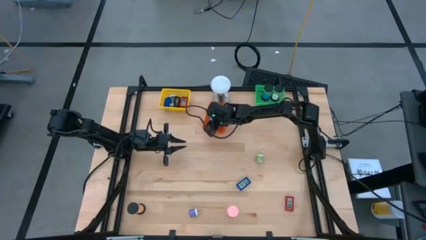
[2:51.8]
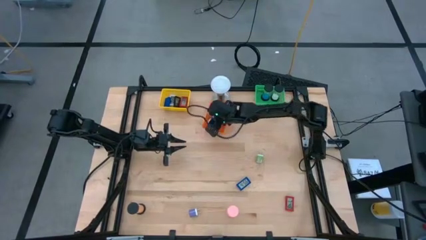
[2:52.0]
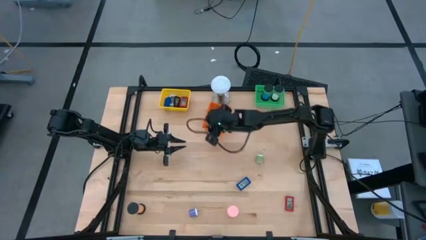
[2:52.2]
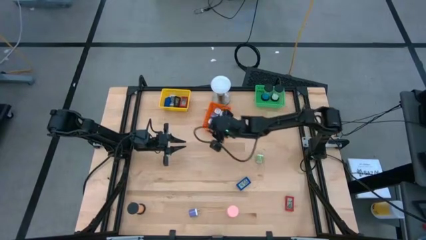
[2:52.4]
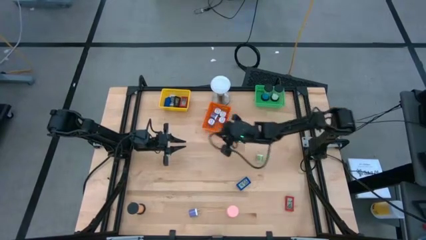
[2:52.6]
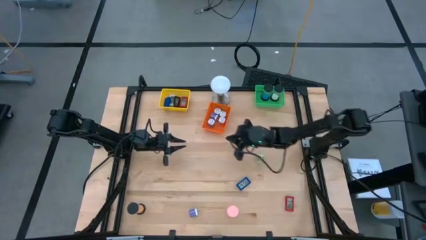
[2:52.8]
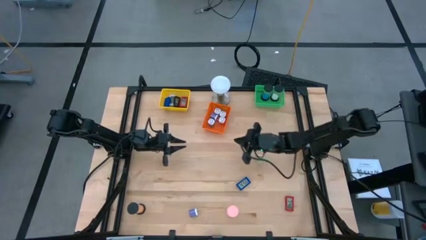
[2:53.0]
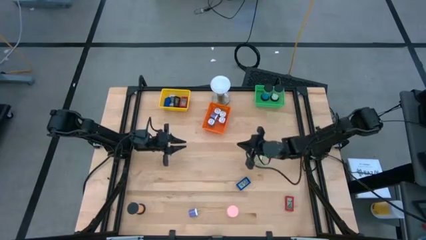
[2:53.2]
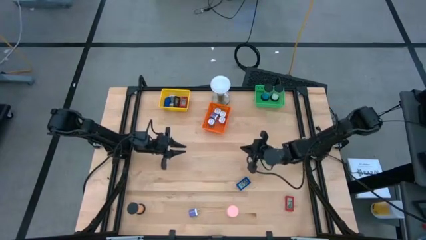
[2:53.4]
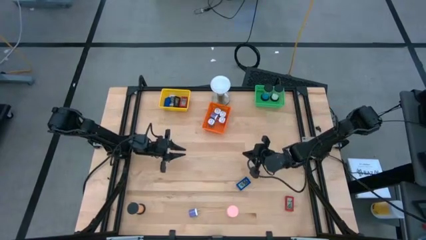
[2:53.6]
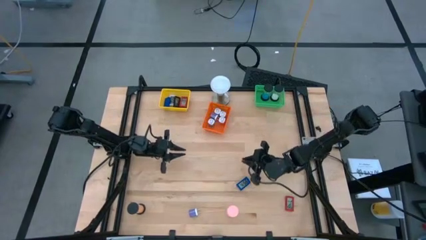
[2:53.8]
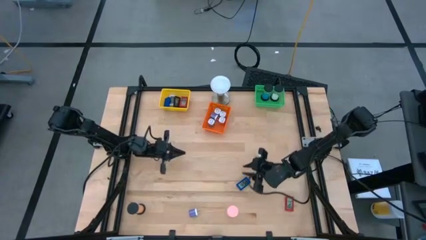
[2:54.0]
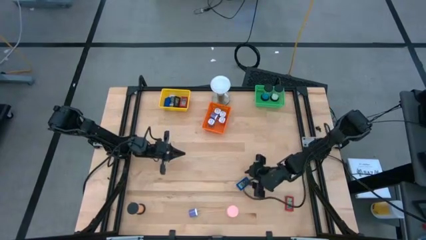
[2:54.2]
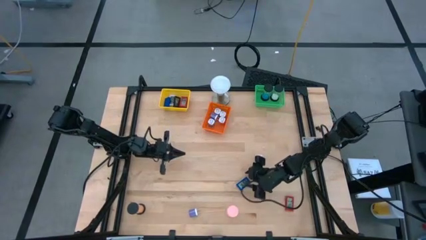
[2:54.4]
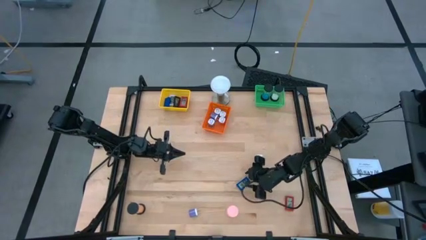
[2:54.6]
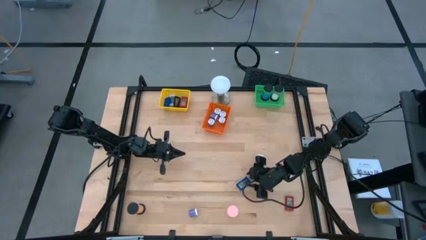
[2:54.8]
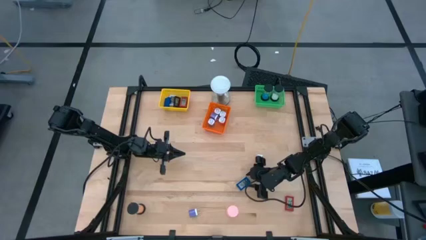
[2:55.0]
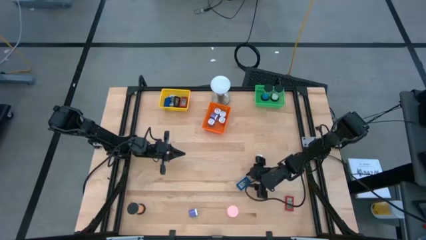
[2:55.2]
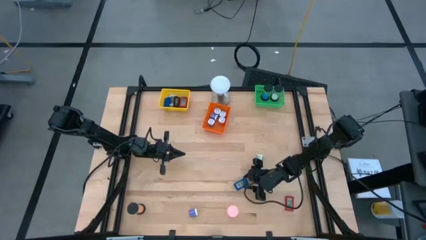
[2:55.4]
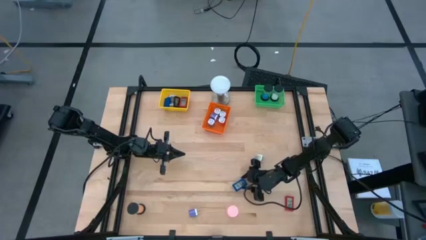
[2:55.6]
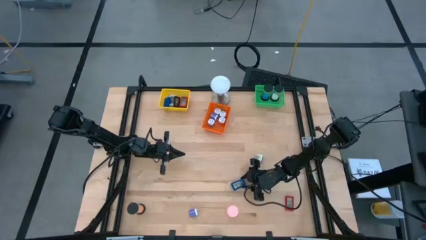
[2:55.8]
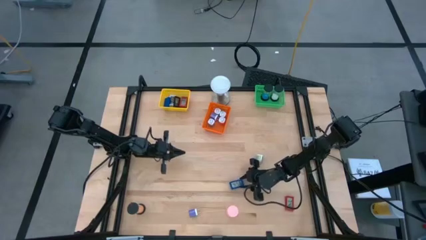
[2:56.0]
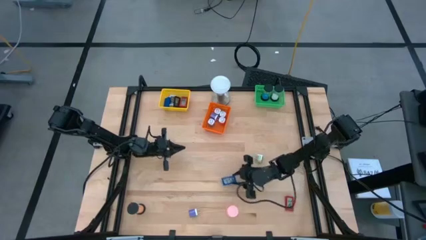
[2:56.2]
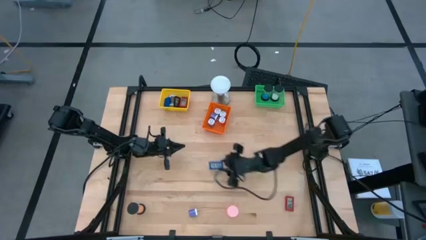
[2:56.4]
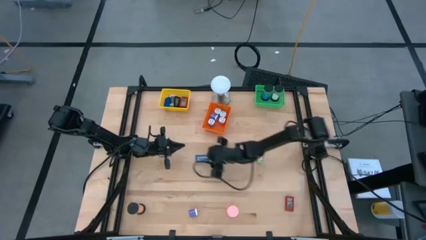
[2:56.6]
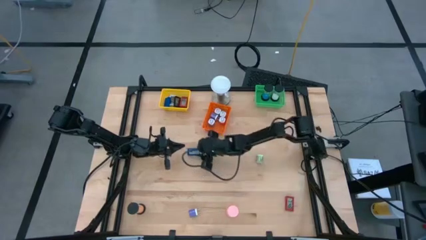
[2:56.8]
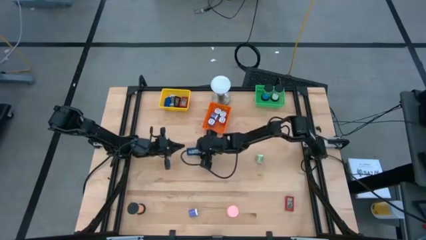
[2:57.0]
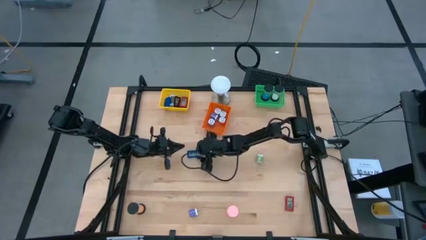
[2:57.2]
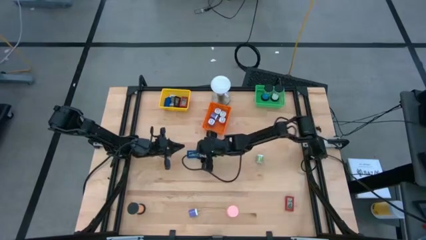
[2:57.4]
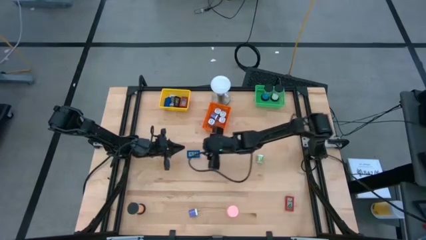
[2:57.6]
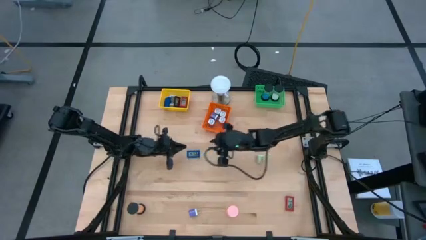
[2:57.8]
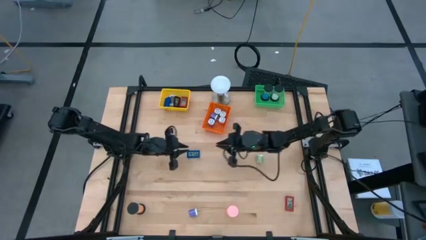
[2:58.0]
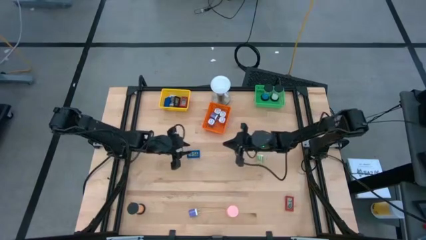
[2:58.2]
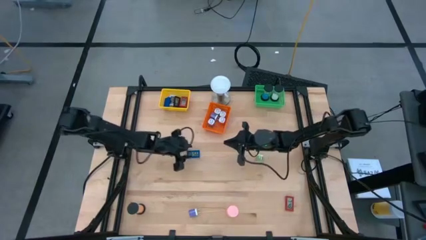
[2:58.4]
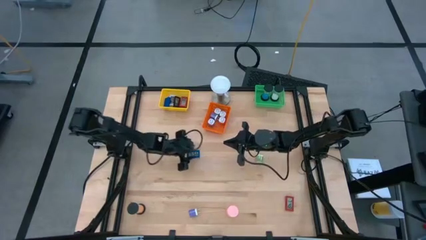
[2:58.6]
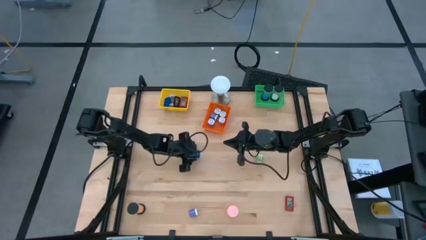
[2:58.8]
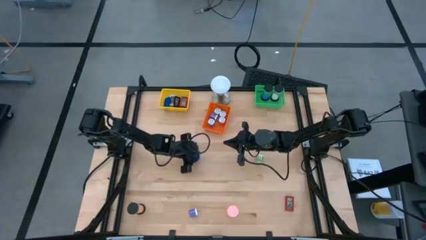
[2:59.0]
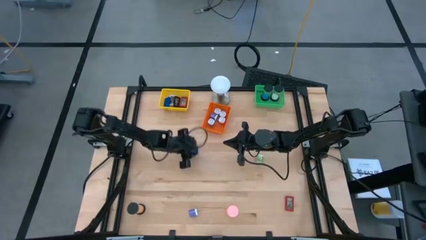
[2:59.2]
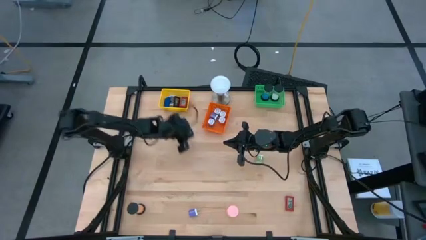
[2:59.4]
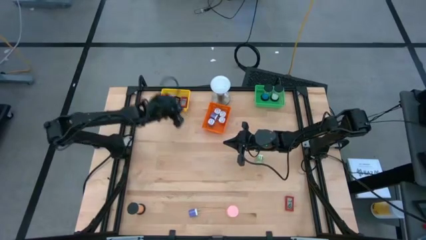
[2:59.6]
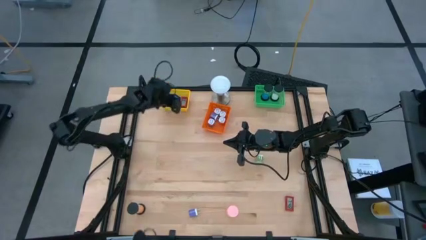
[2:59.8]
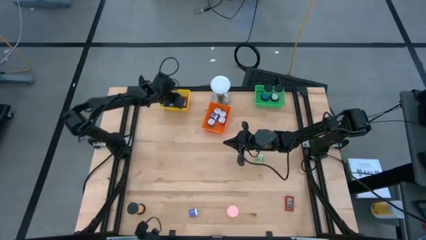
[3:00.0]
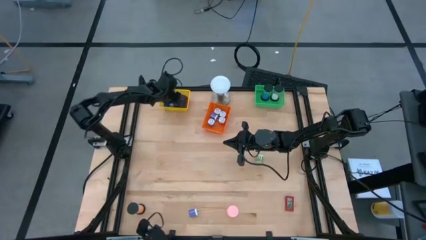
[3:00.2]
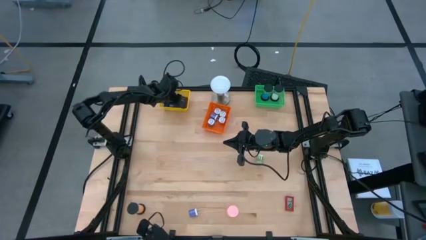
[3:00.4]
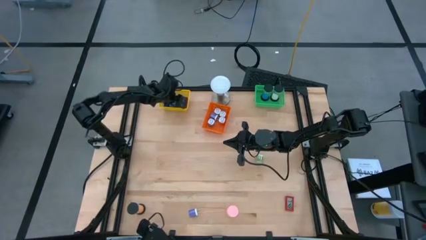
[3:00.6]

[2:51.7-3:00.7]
Task: Pick & Place Office items
Put the blue digital clock into the yellow bin

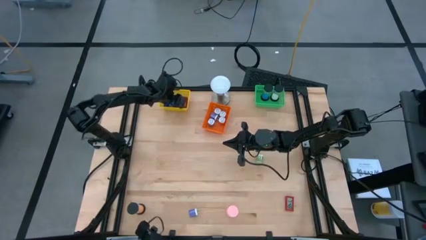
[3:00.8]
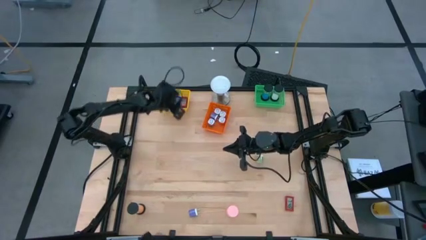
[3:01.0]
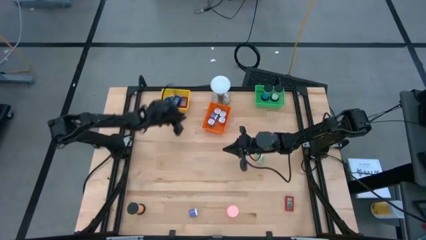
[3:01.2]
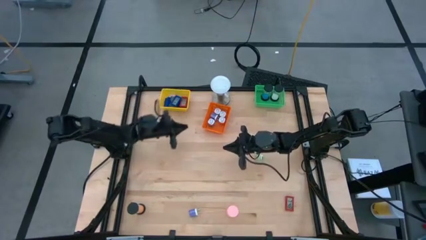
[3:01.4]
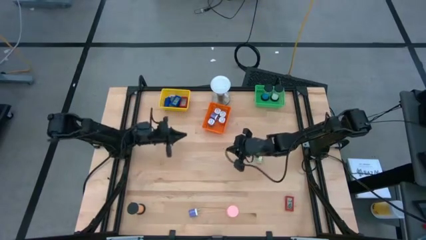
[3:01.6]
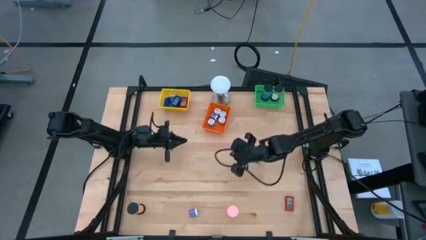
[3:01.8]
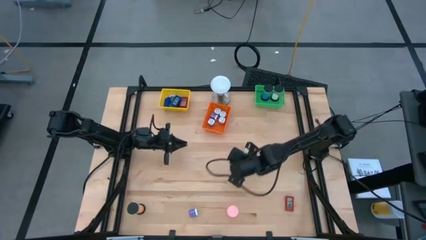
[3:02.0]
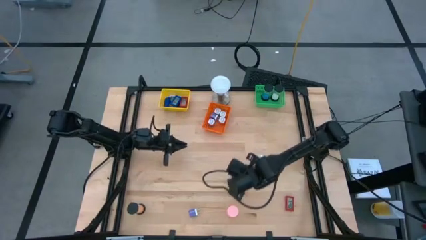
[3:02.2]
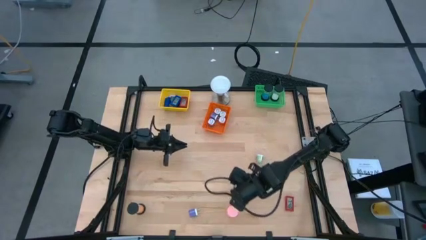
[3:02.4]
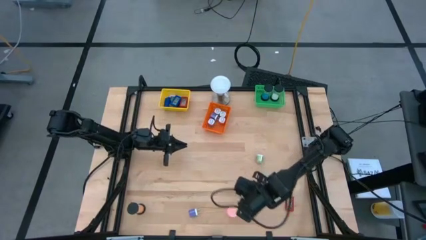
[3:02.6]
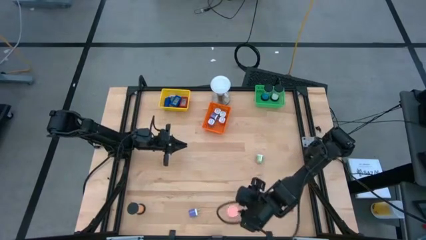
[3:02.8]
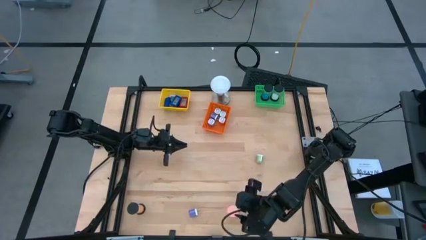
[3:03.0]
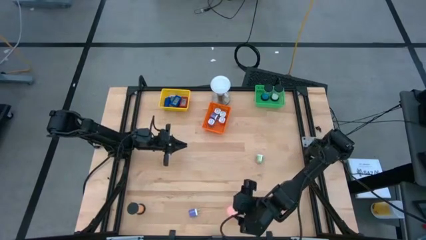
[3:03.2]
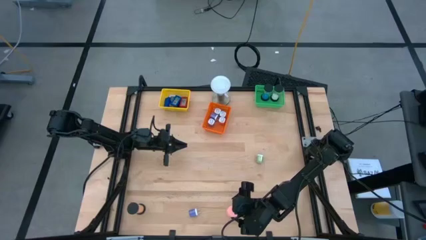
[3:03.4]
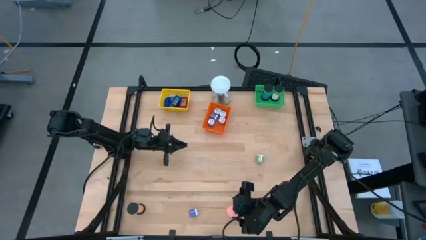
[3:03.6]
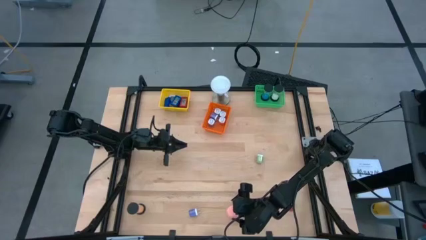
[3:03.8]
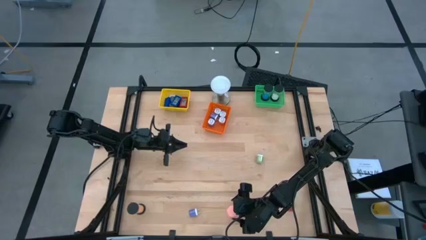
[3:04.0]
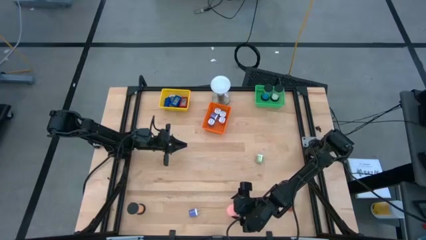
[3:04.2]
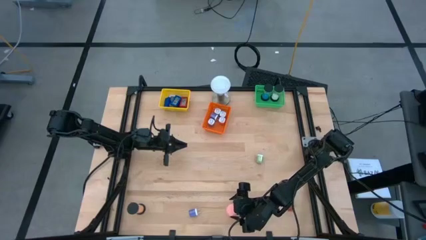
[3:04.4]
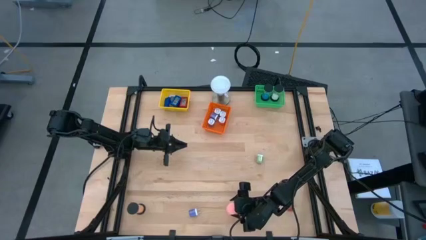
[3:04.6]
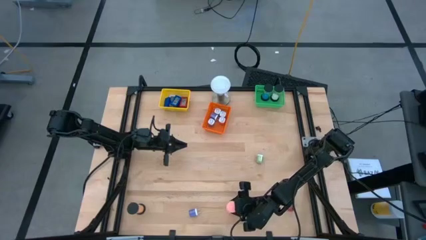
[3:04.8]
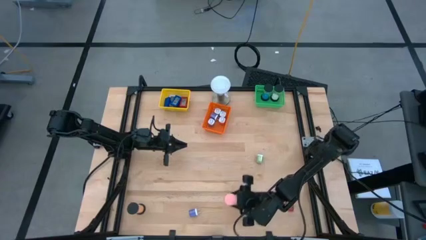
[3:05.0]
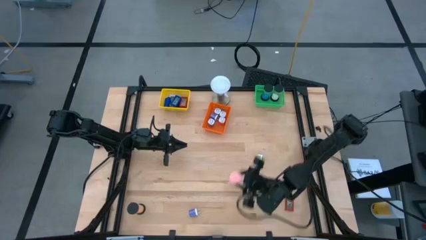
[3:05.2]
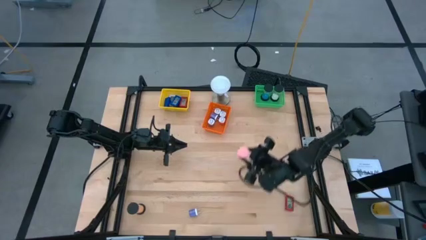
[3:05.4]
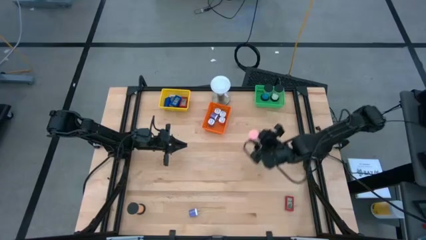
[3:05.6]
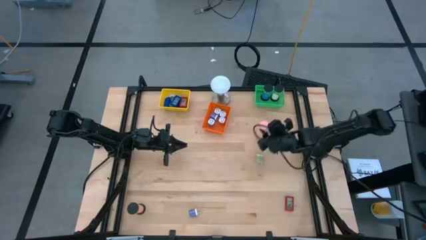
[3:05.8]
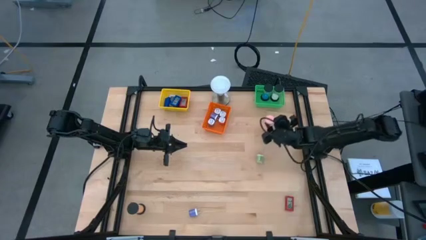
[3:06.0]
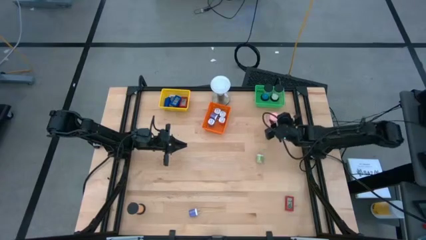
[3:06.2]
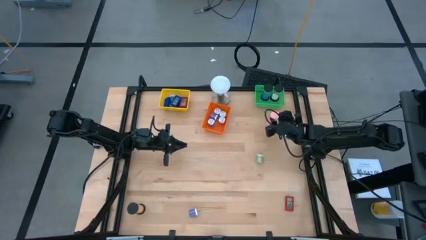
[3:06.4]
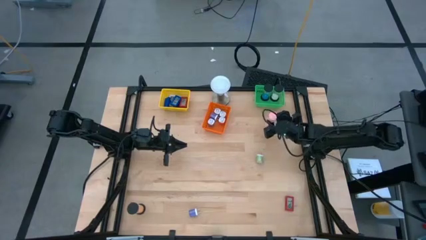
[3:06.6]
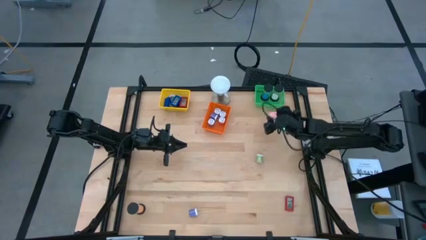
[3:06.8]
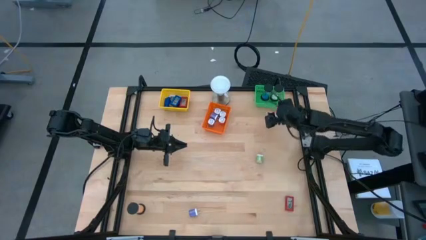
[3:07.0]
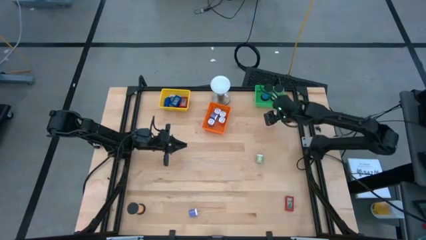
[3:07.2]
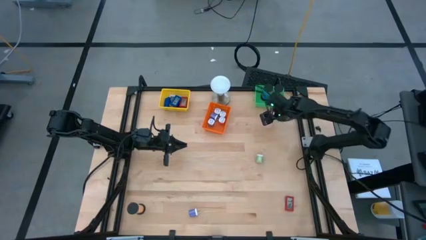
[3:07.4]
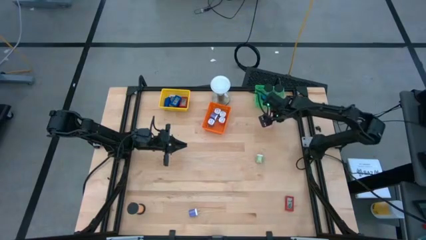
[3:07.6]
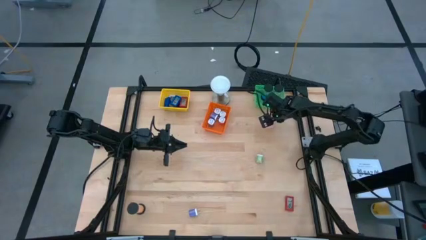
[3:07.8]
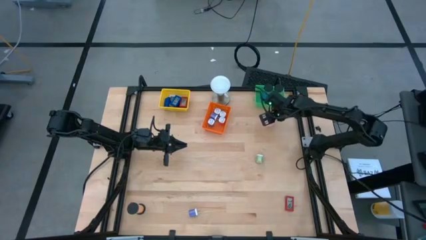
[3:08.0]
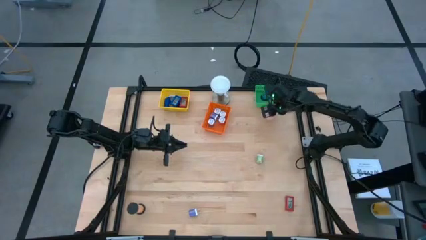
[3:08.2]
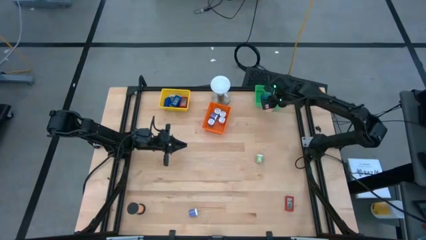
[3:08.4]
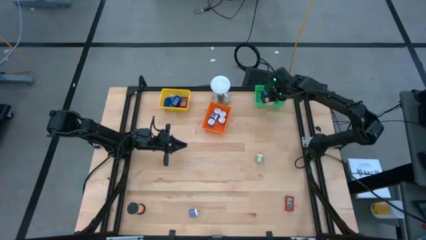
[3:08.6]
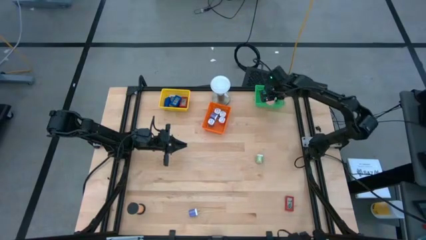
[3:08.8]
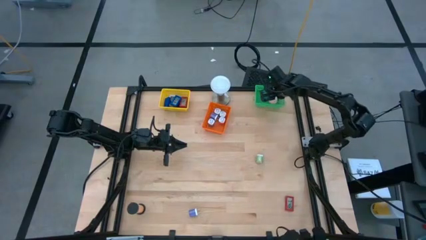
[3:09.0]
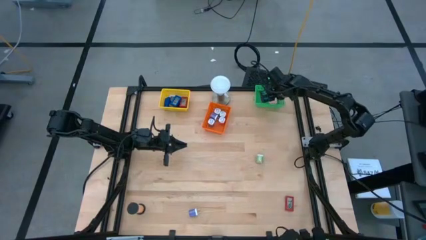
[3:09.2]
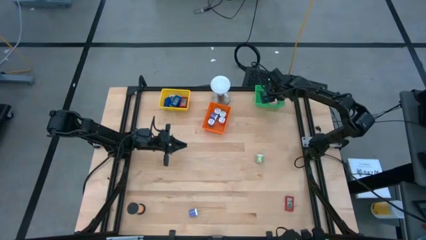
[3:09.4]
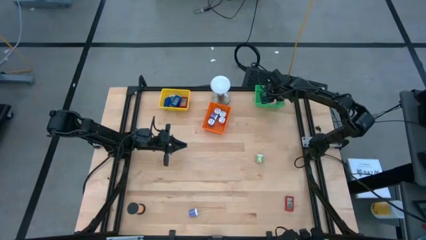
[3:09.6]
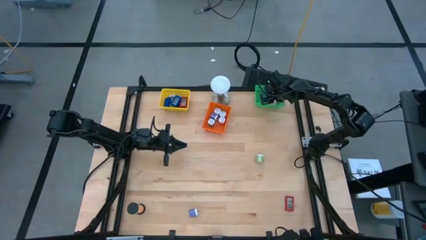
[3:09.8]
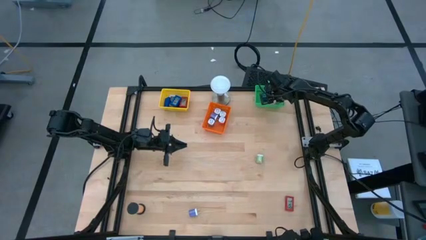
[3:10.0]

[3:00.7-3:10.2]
Put the pink sandglass timer into the green bin
